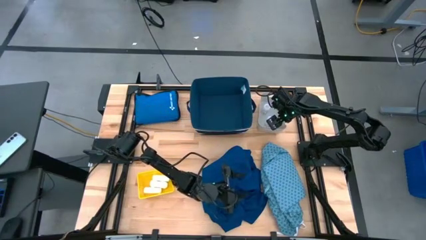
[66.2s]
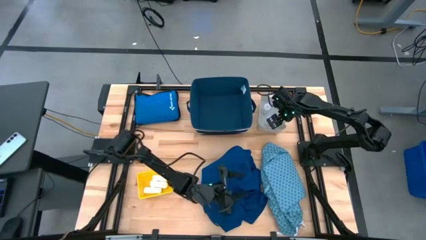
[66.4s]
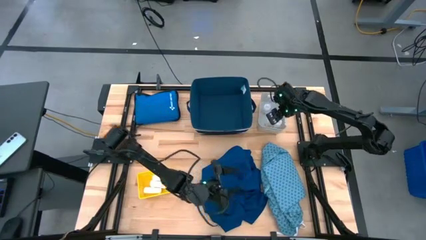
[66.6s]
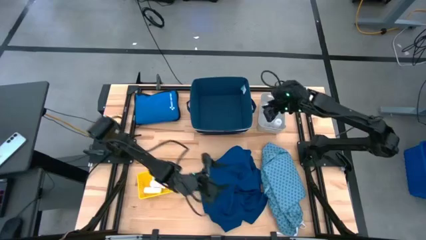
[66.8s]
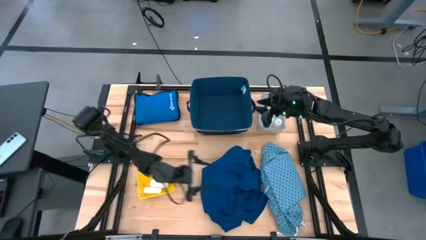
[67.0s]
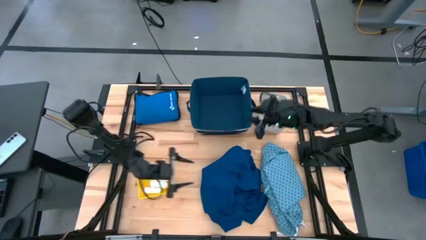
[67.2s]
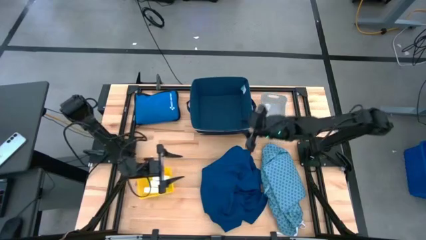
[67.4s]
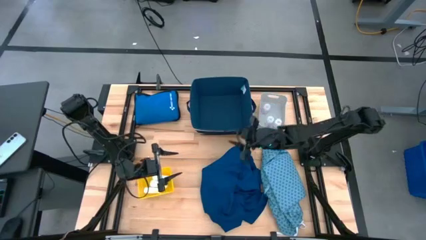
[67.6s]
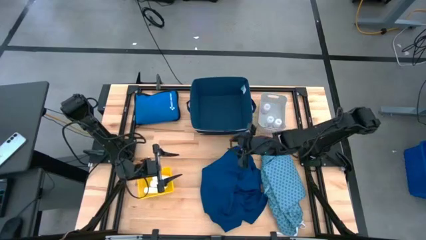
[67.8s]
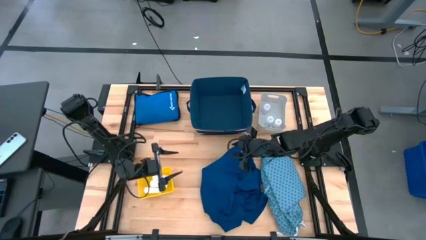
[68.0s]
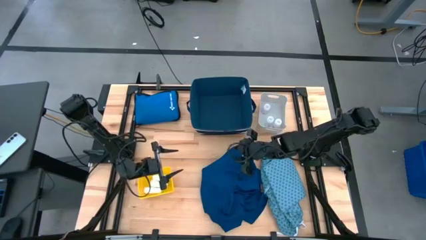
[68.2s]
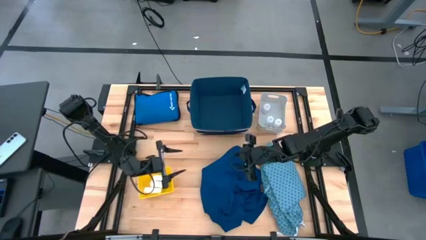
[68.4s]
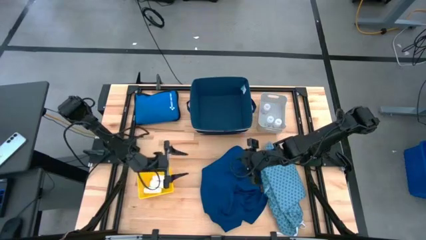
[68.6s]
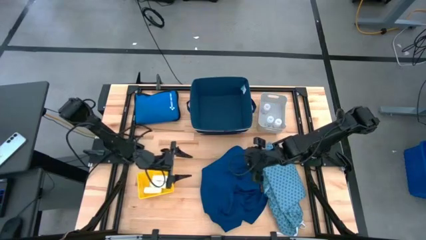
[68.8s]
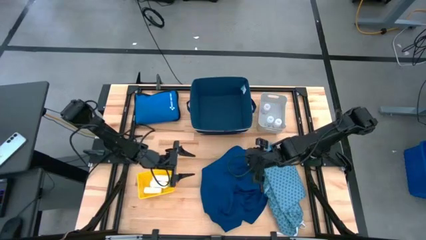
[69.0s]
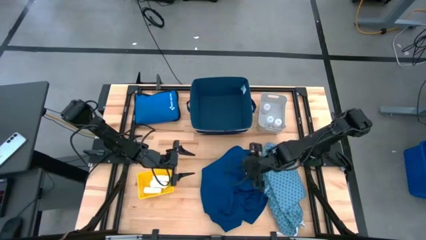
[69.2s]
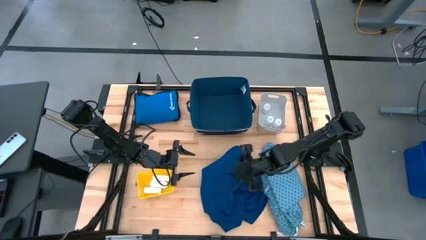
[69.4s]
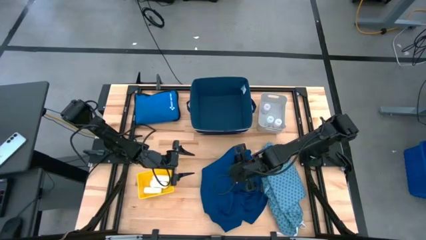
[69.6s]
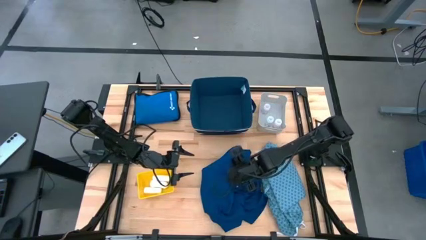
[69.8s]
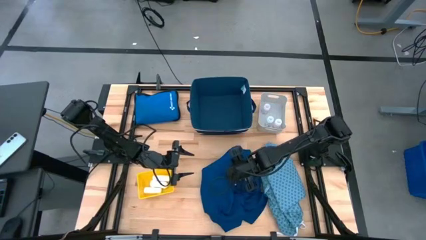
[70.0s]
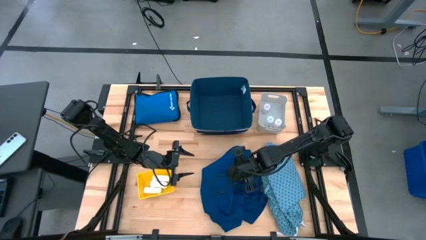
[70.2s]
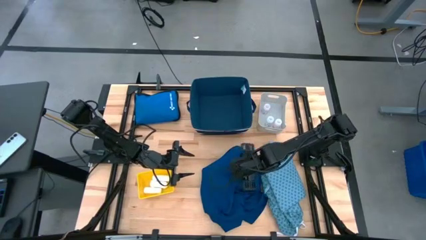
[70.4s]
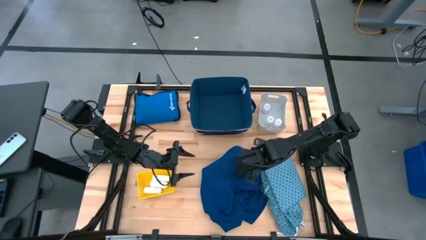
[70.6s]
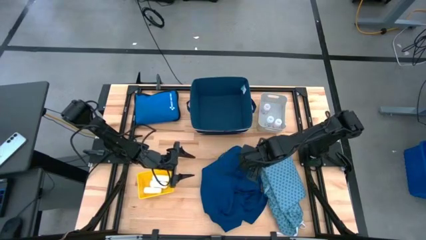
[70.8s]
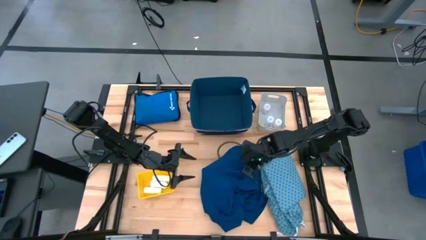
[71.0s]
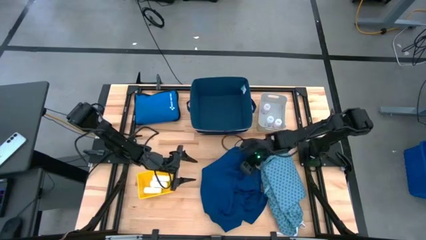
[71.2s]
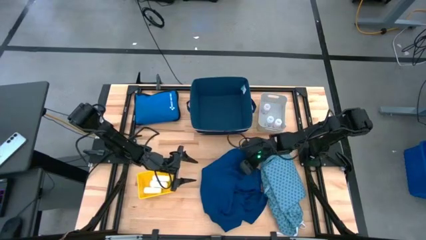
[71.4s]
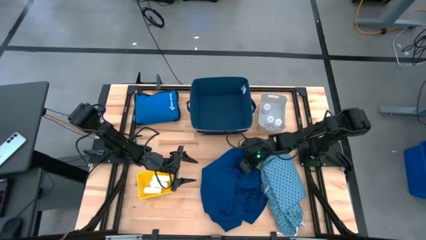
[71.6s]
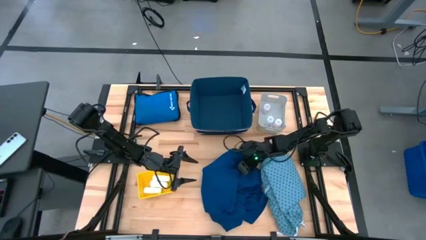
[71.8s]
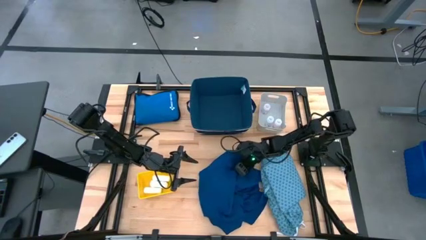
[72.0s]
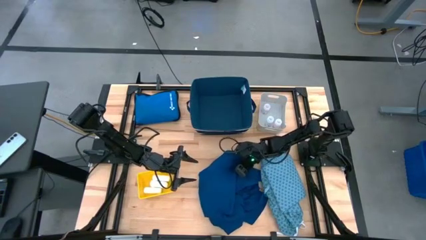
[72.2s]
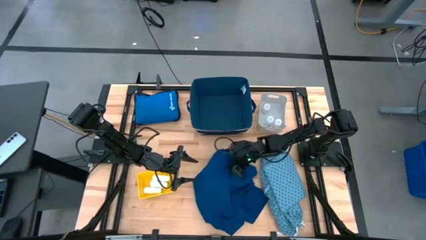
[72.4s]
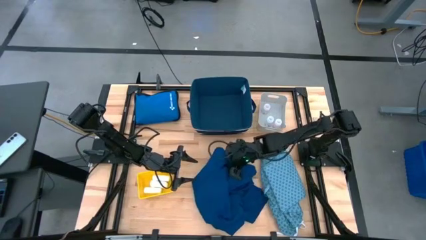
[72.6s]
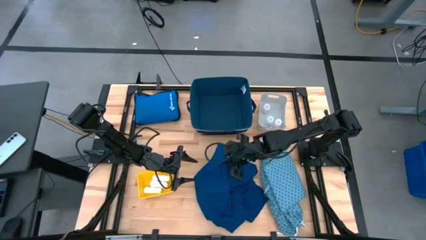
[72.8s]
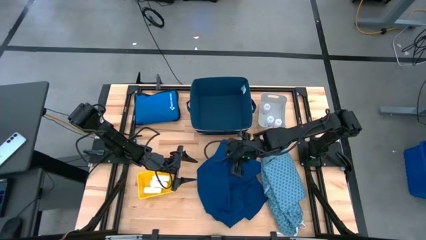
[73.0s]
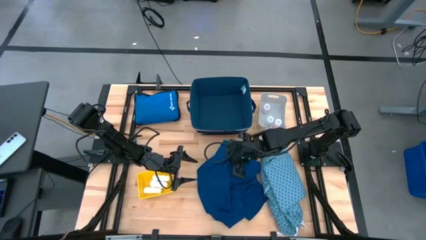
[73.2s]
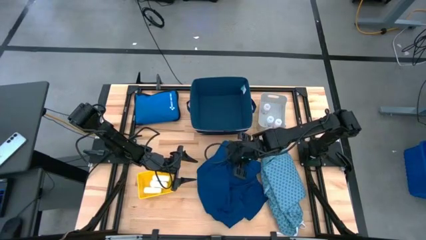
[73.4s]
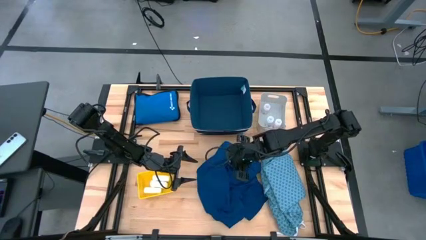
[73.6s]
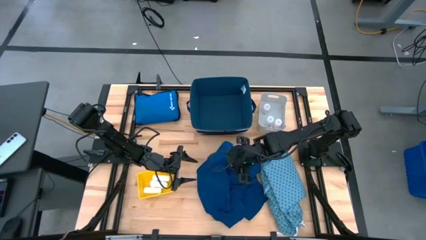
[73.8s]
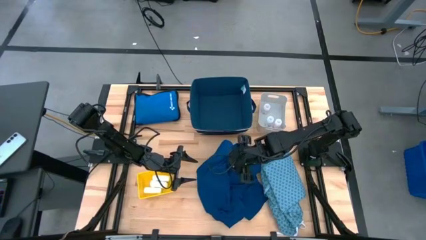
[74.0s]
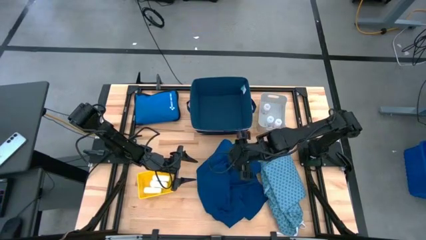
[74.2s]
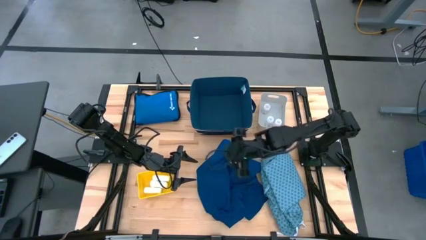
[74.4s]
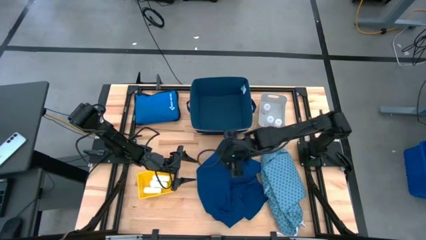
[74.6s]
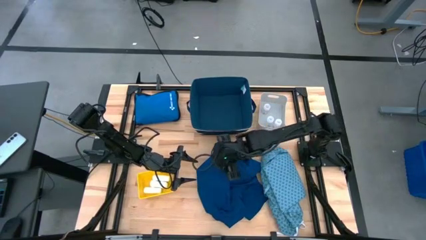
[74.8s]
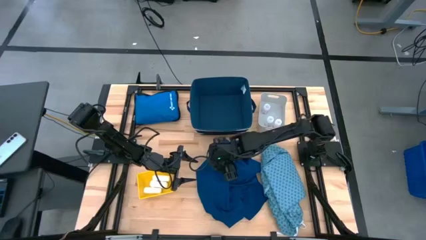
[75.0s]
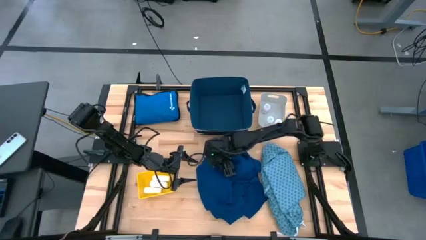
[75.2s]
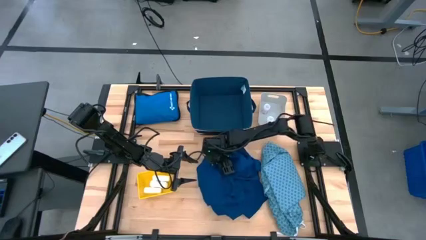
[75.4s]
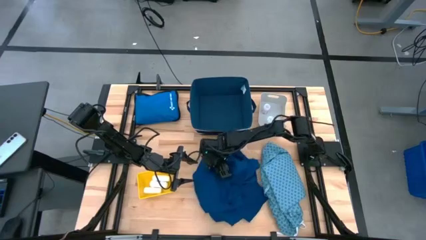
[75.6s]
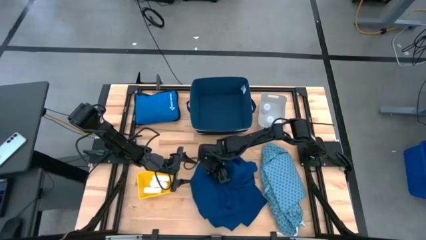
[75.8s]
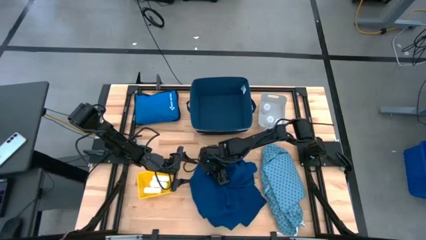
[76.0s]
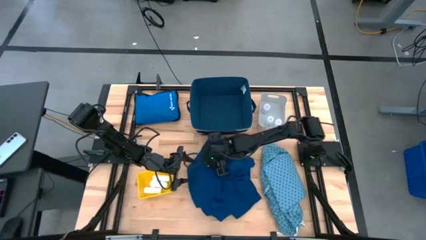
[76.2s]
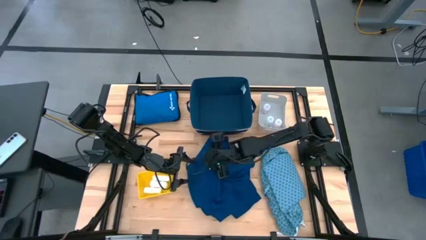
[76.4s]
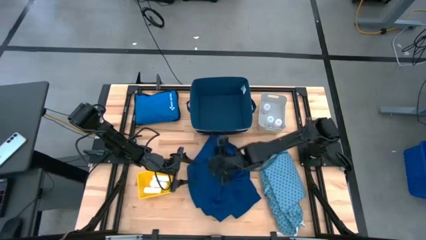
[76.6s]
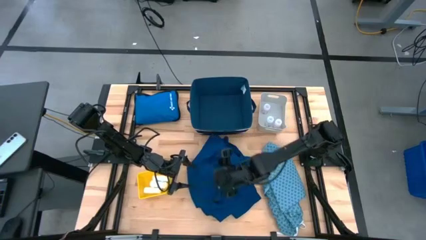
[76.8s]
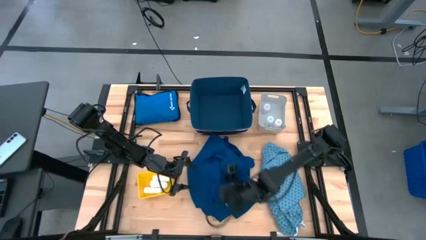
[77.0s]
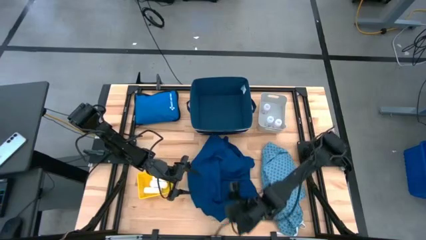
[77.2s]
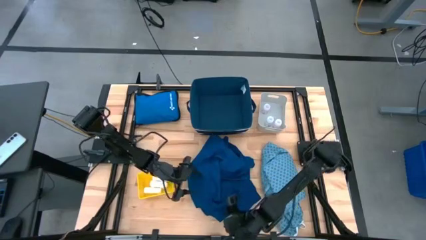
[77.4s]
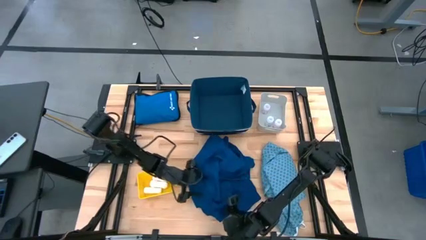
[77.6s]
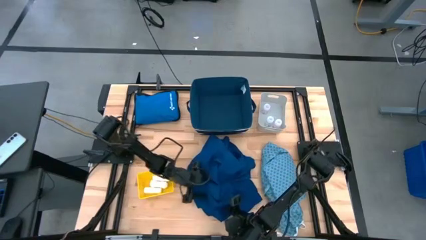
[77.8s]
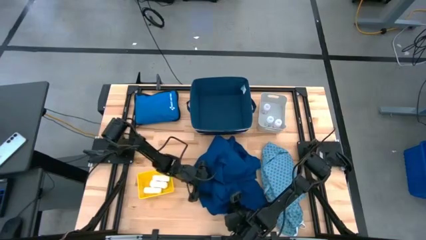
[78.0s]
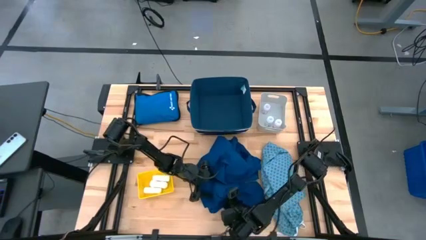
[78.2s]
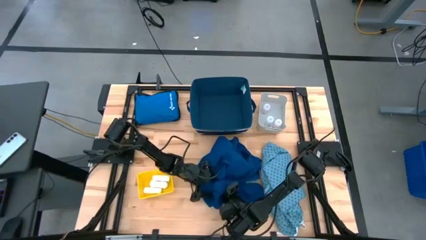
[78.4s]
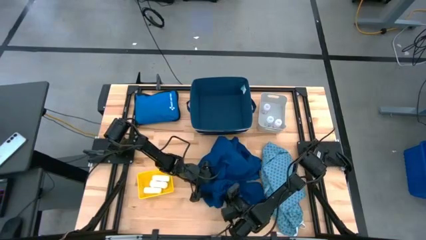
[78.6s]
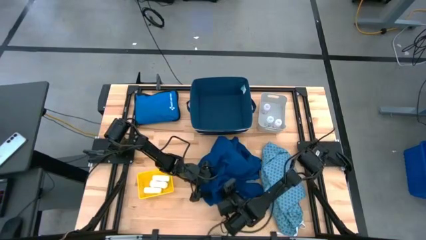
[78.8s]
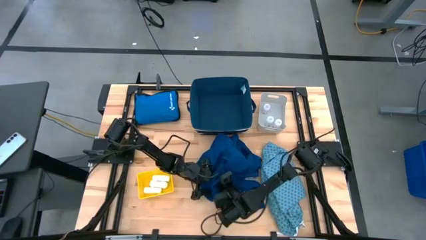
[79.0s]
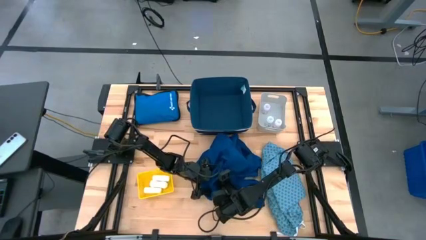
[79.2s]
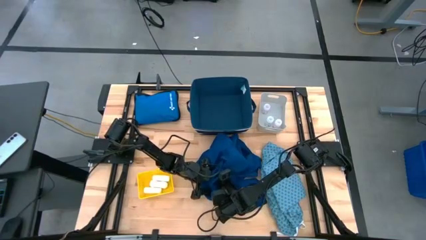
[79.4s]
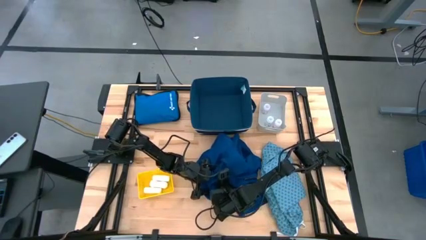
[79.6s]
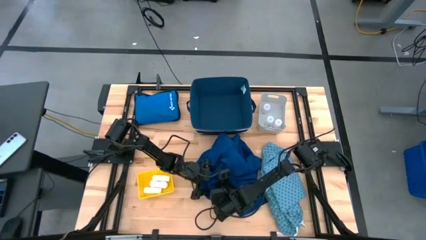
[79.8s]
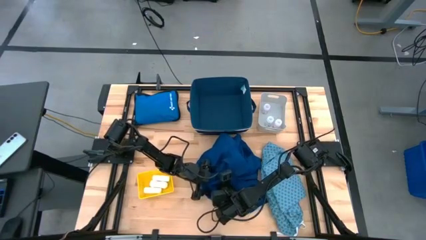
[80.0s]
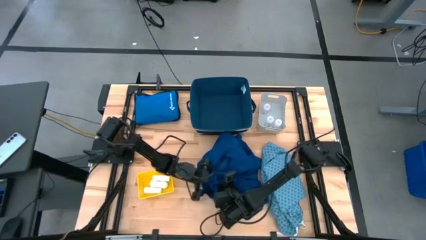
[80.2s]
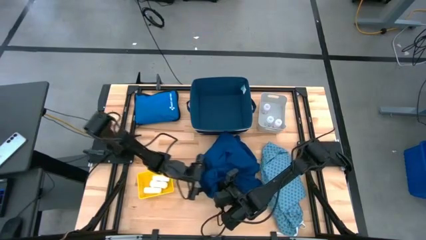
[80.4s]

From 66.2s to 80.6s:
Task: Pick & Place Medicine items
Adjust the blue patient gown

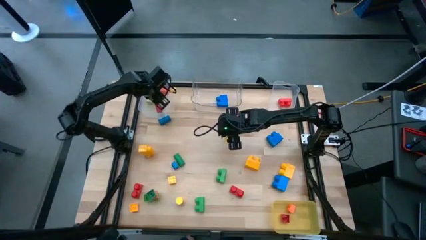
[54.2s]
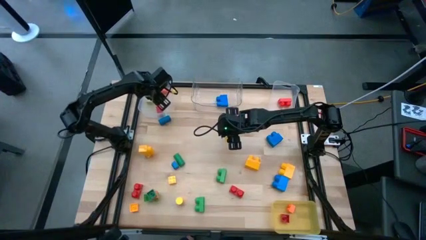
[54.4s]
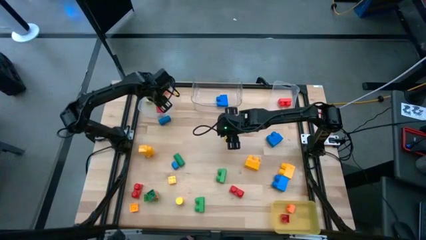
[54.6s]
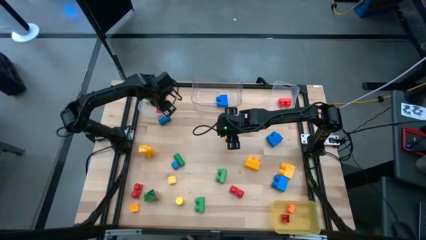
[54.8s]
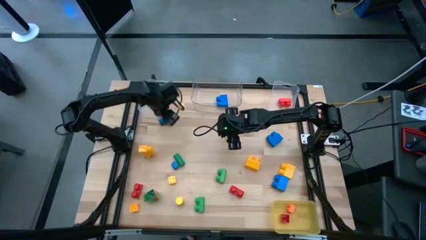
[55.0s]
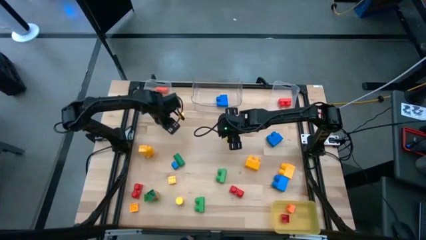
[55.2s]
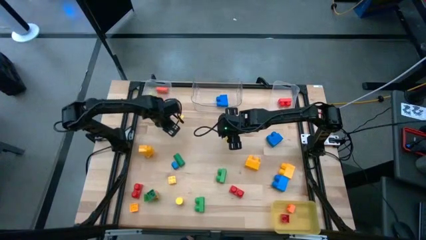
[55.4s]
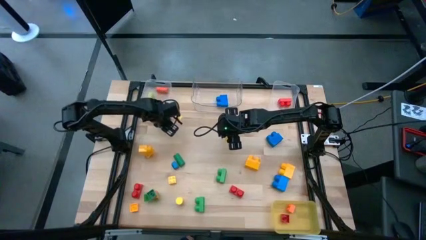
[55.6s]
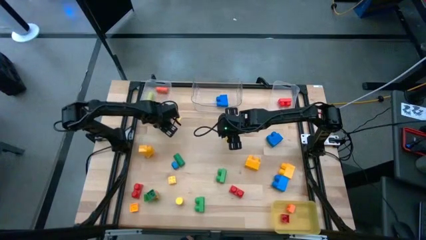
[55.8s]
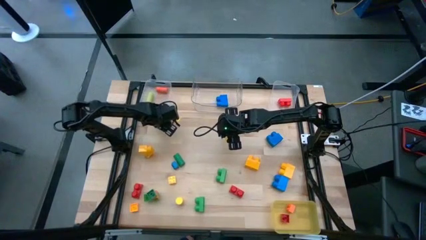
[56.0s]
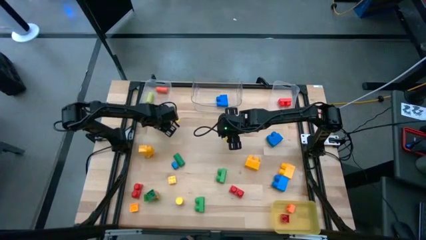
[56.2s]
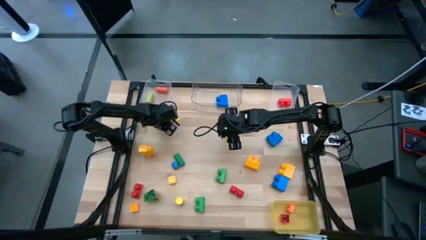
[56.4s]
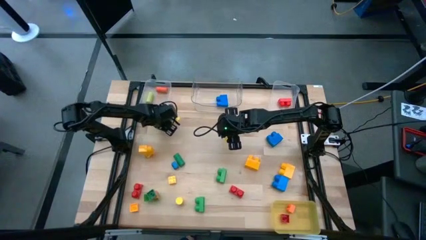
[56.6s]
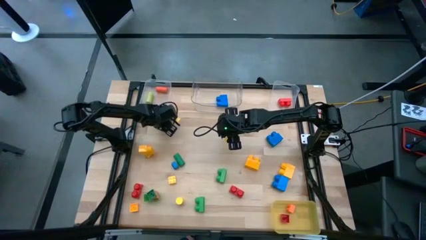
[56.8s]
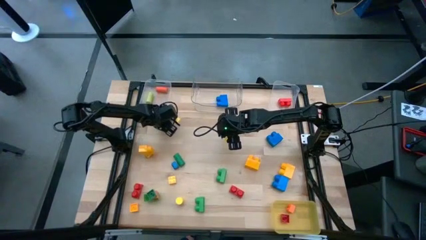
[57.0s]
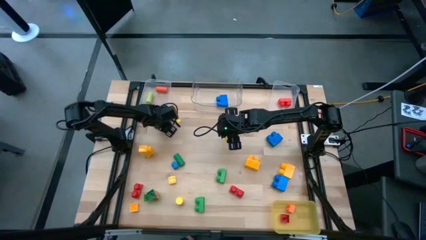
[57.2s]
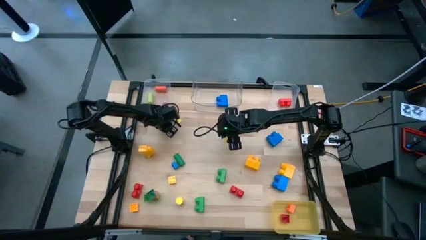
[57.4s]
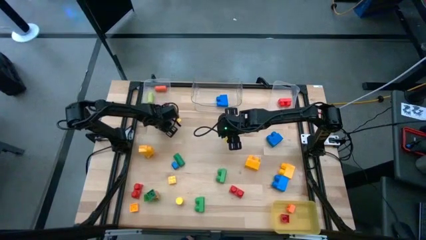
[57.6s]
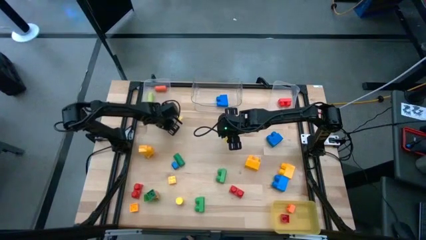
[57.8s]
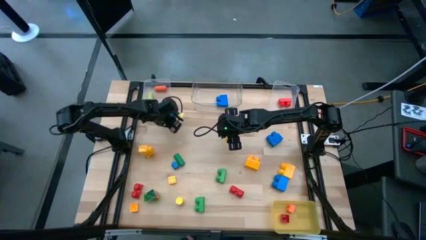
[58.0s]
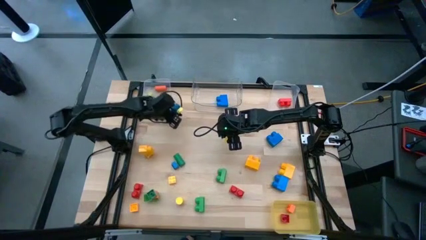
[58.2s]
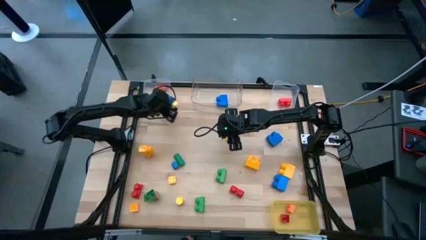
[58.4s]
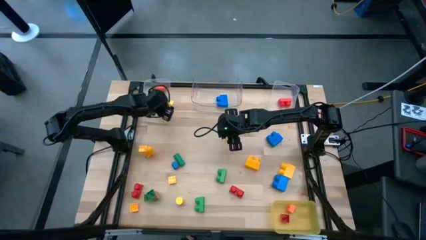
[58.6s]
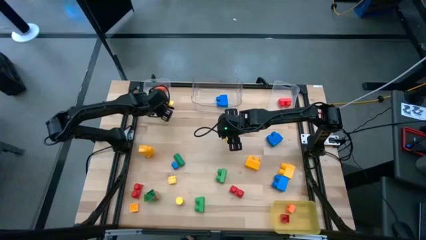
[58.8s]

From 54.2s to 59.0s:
Task: Sort blocks by size
Put the blue cylindrical wooden block into the left transparent bin
